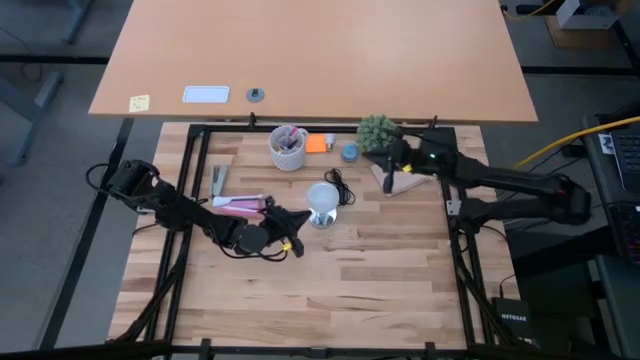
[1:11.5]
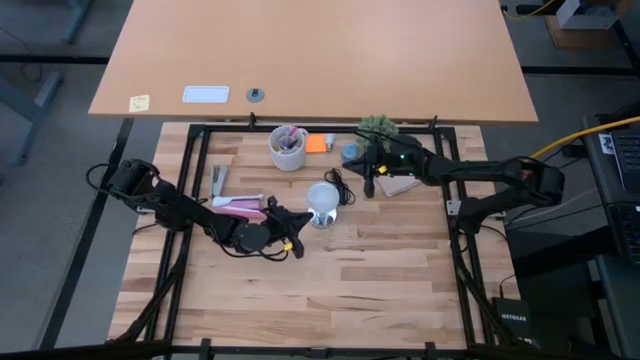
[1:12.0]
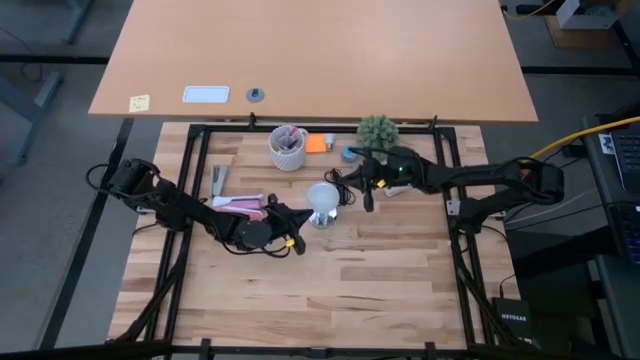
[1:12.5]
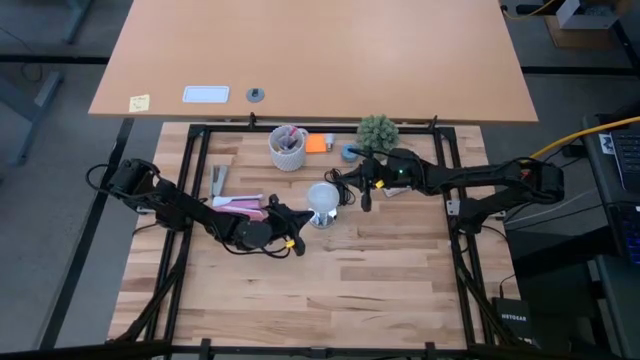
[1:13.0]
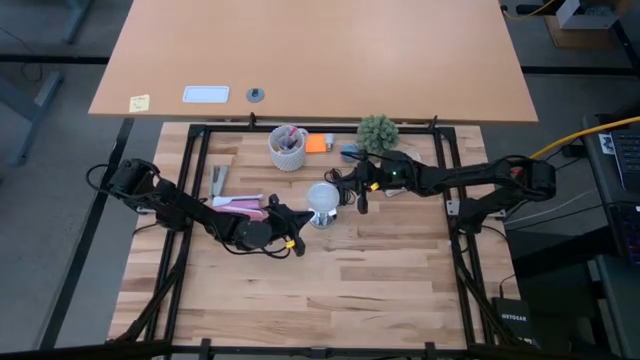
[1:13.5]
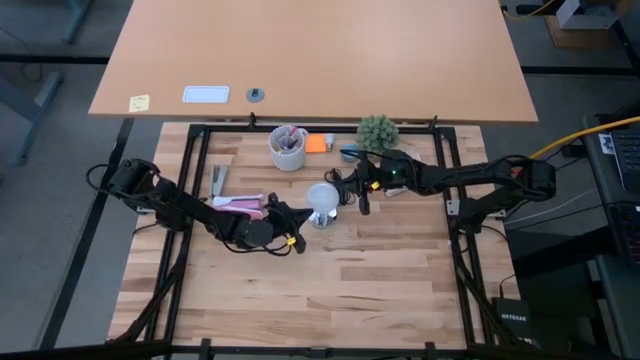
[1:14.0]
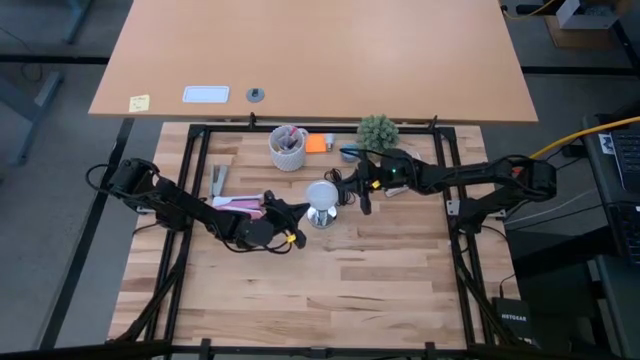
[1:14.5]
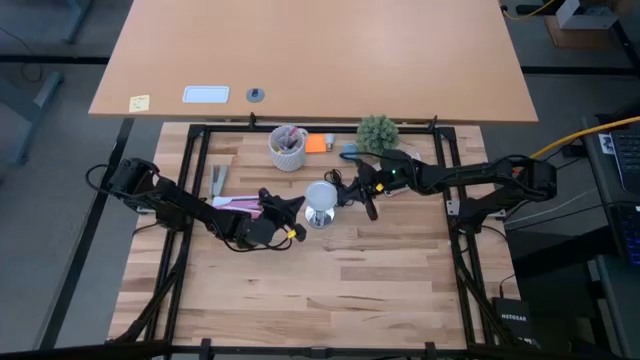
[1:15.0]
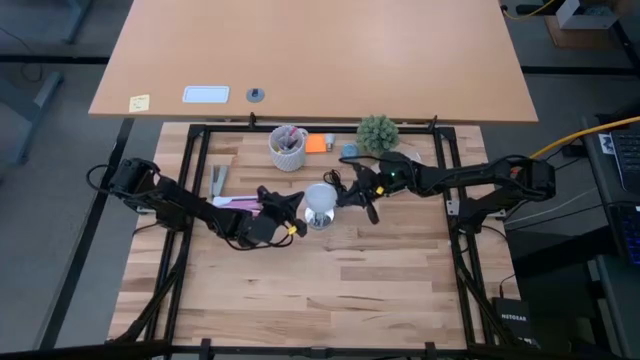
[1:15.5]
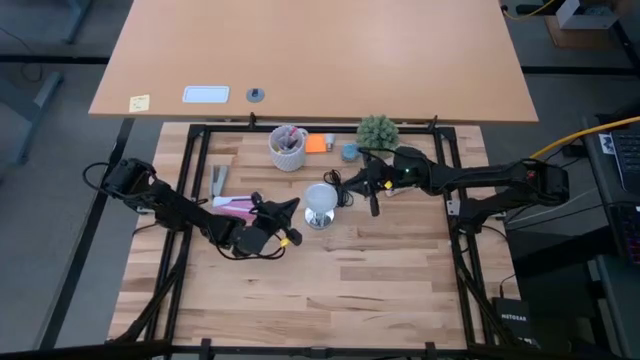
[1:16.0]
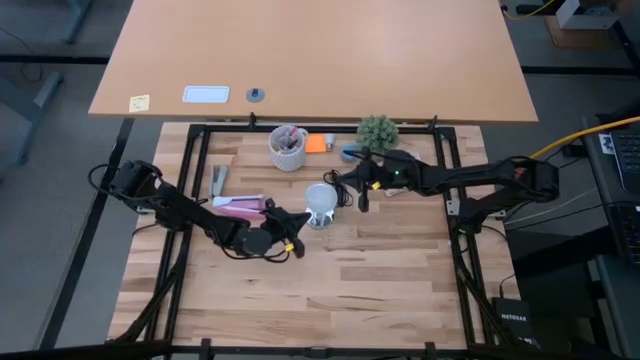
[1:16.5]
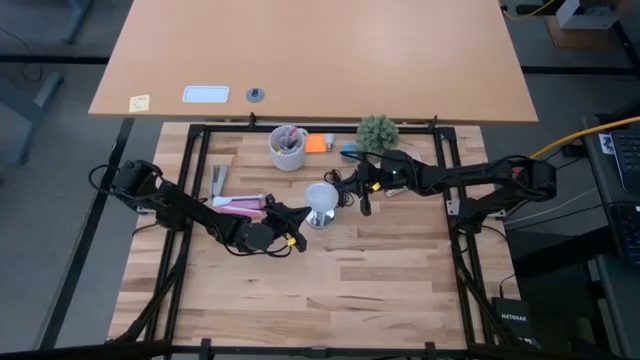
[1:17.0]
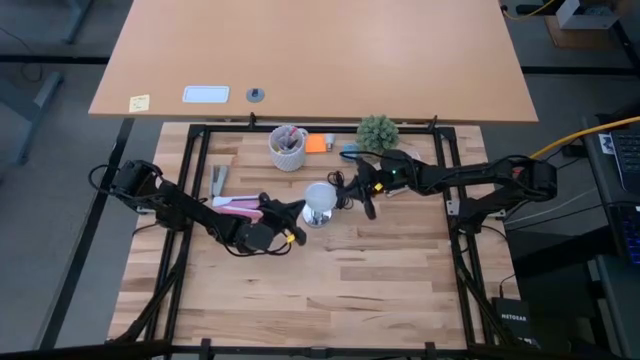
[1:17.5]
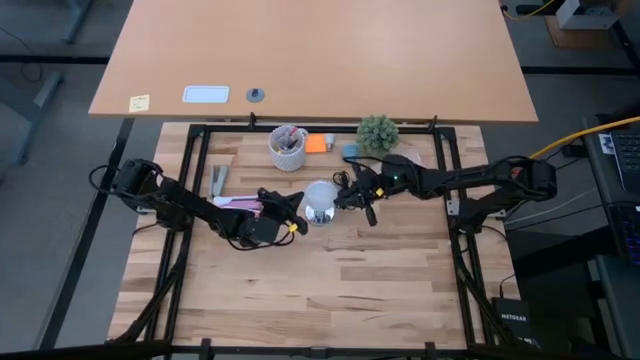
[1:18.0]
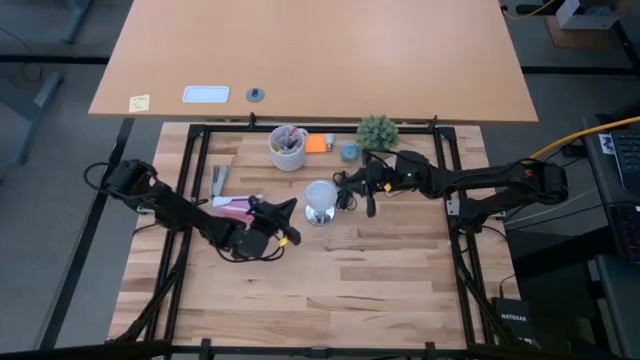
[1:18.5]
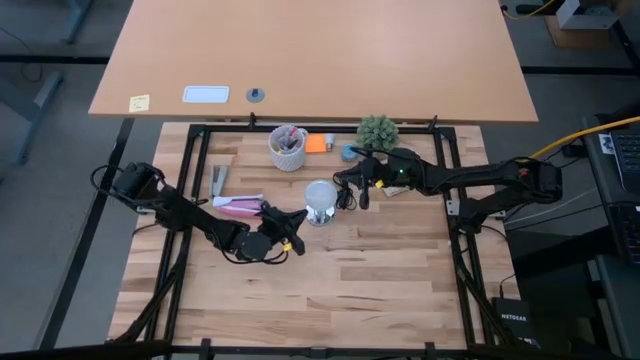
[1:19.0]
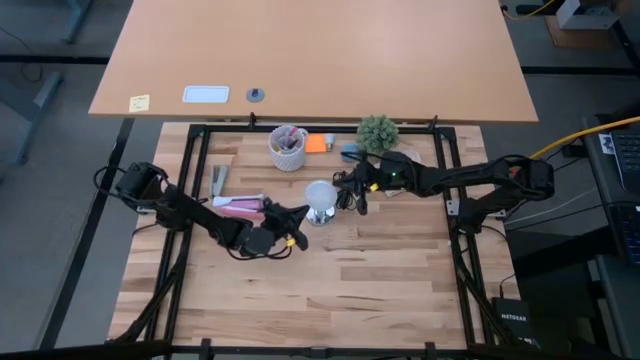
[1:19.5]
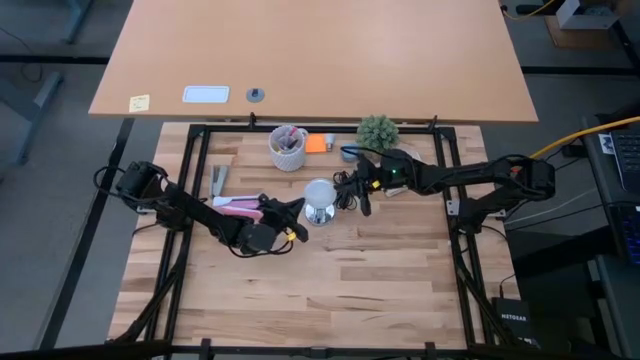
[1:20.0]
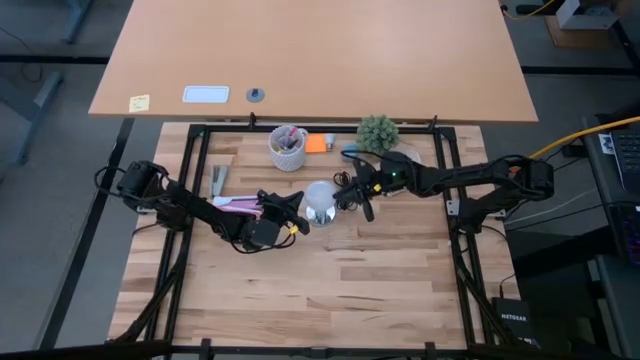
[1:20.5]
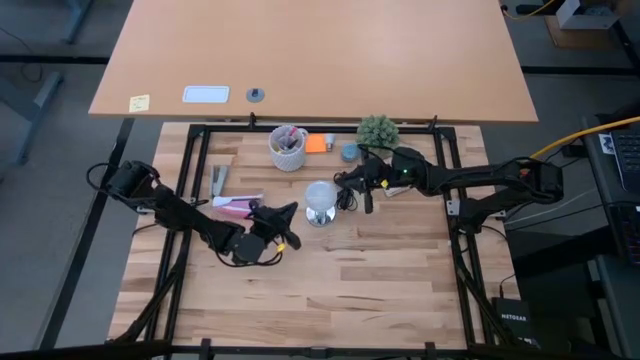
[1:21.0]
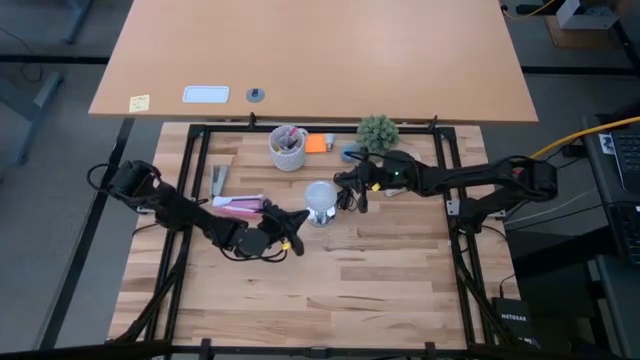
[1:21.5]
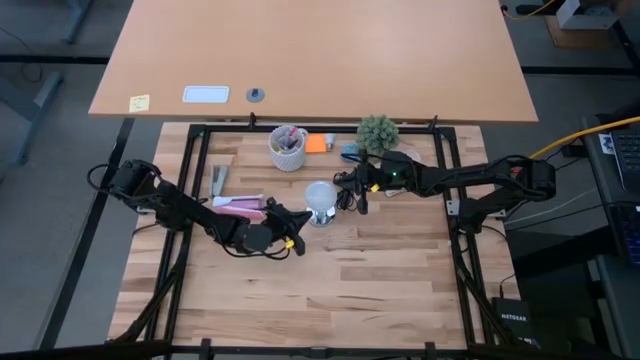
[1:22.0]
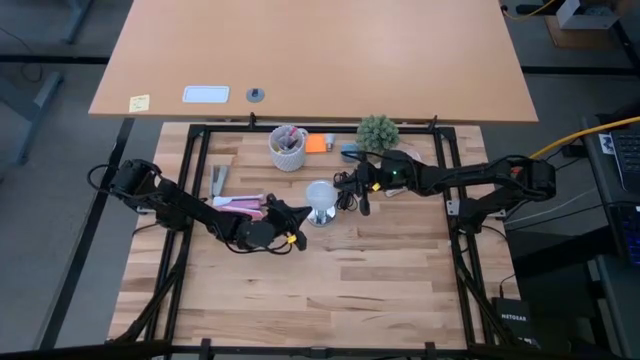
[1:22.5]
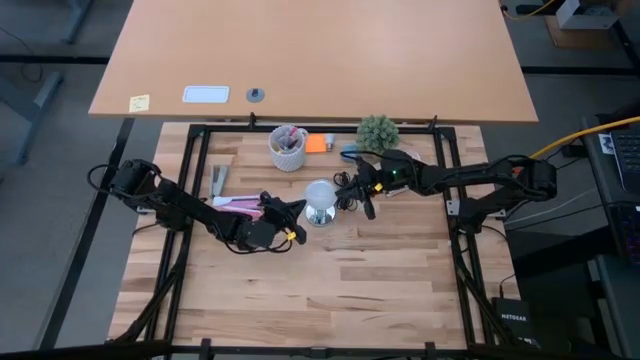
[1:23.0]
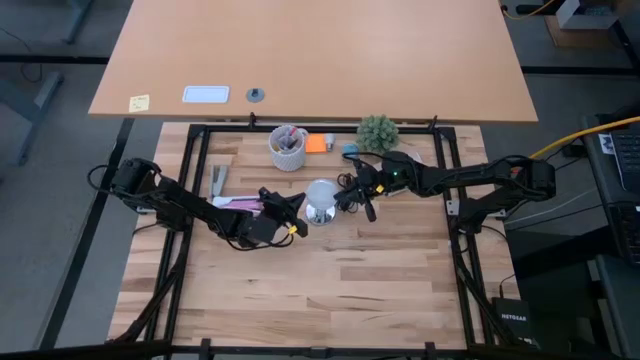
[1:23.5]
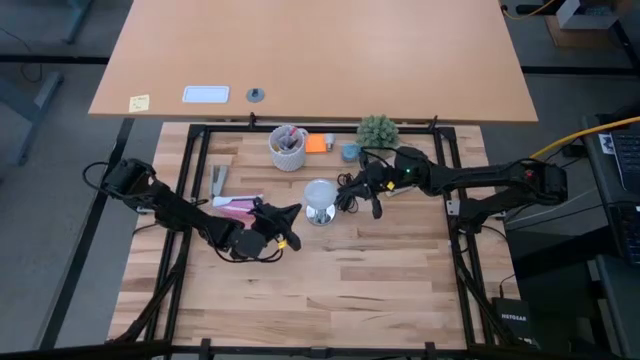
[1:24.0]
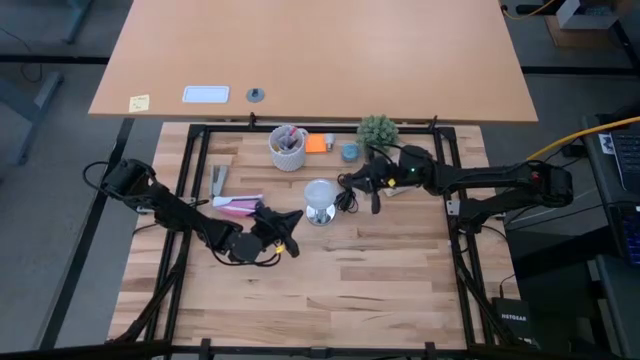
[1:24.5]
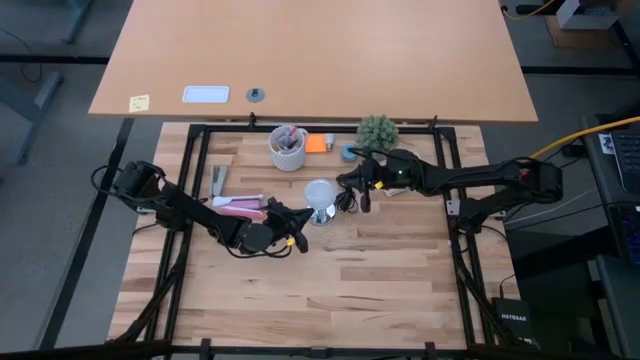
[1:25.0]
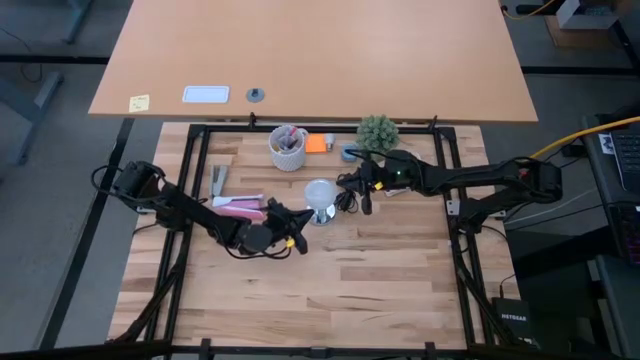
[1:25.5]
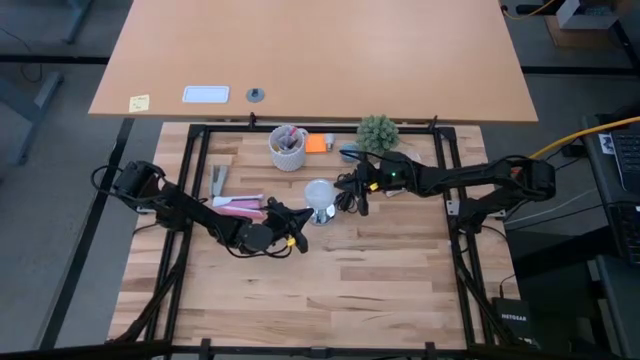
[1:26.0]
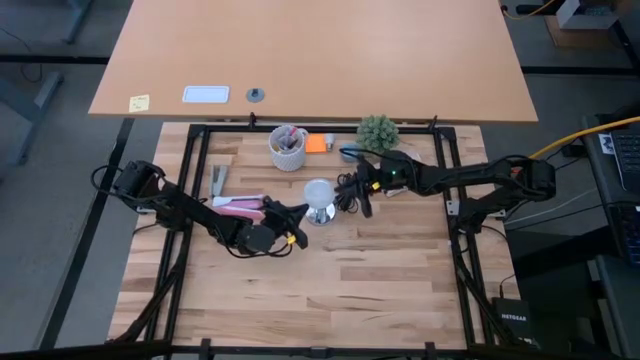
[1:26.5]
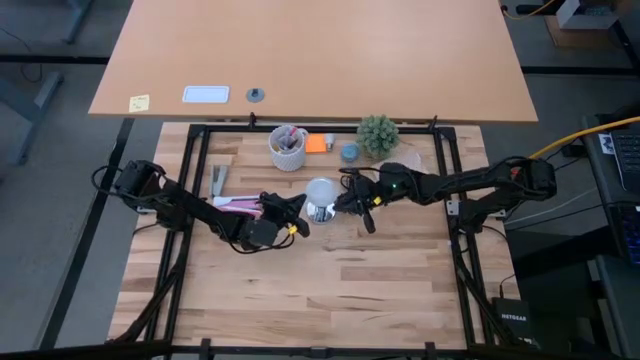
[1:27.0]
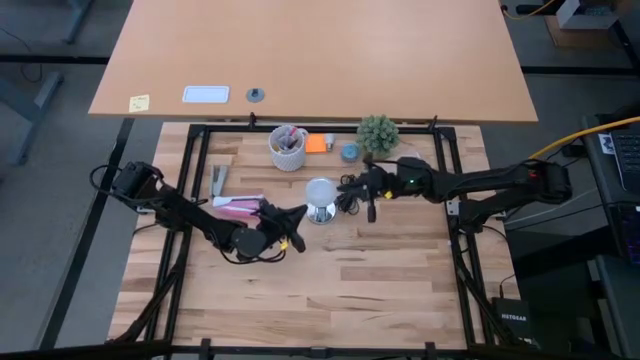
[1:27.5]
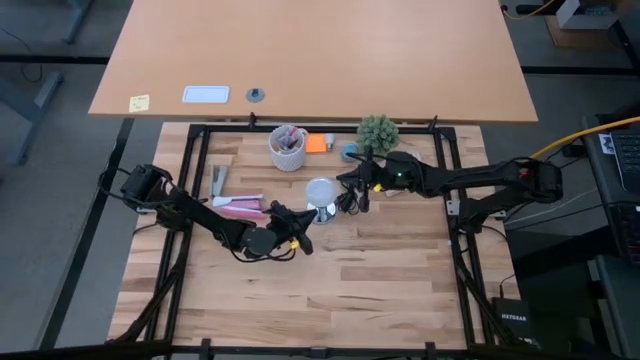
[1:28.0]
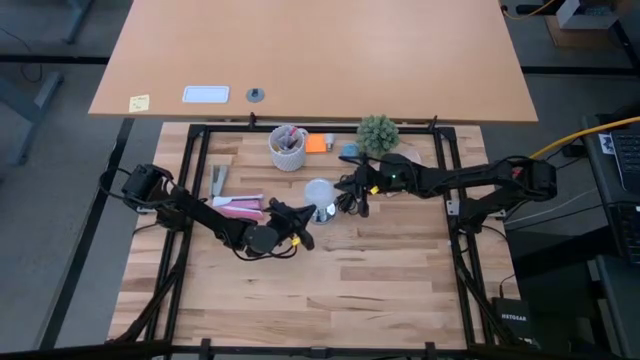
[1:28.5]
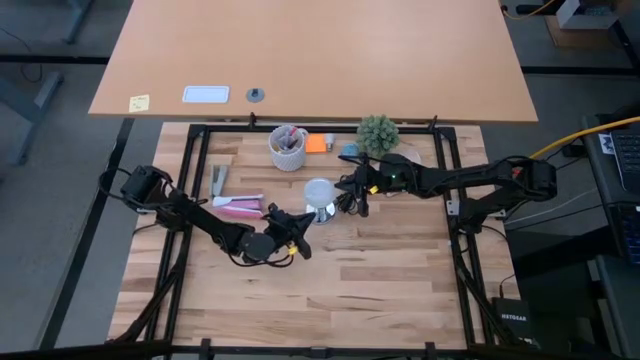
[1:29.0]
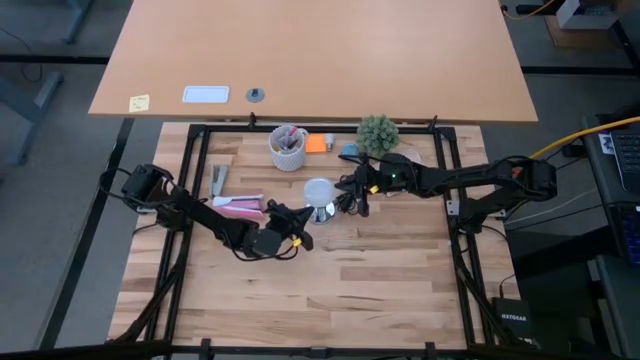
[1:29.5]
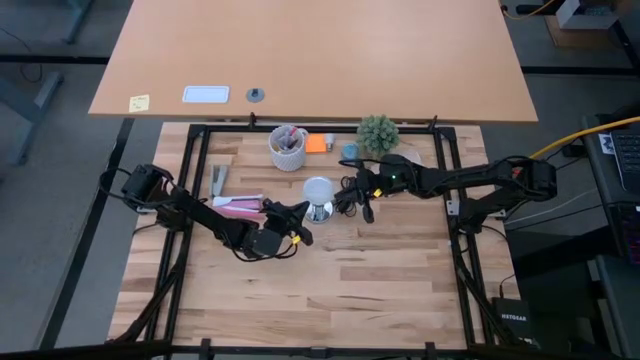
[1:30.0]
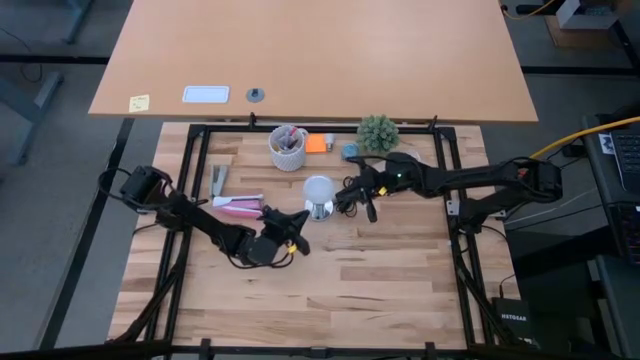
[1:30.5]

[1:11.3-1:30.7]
Task: Screw lightbulb
Insert the white light bulb into the silver lamp
